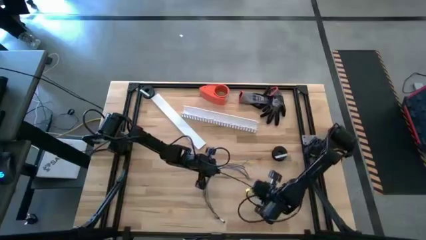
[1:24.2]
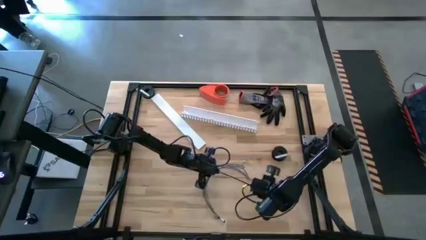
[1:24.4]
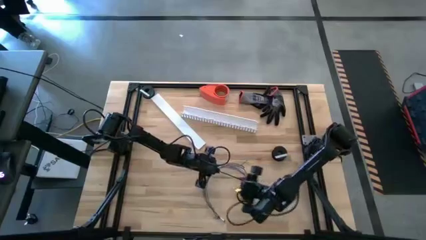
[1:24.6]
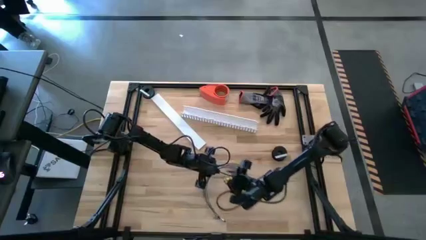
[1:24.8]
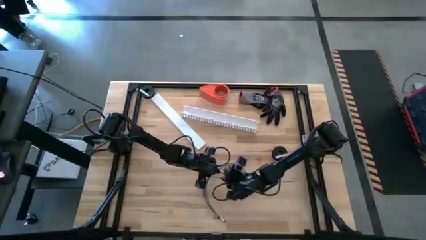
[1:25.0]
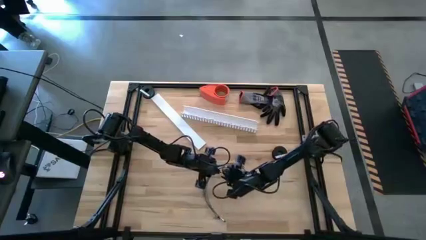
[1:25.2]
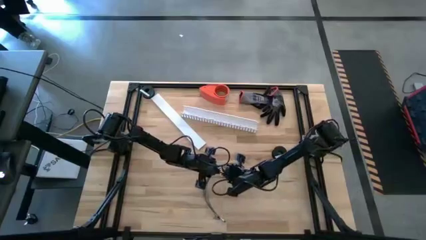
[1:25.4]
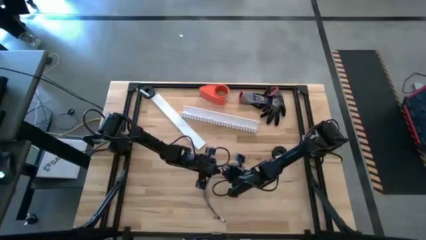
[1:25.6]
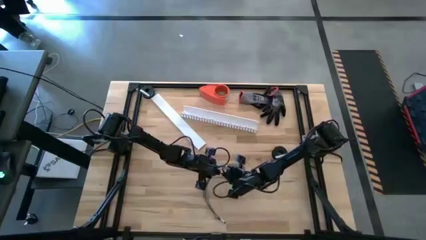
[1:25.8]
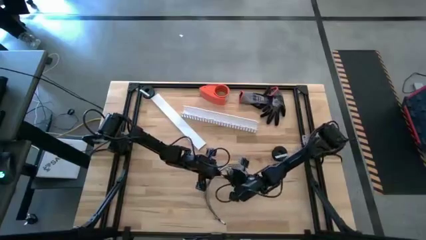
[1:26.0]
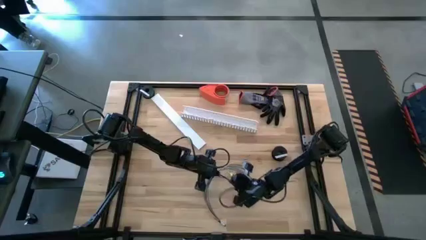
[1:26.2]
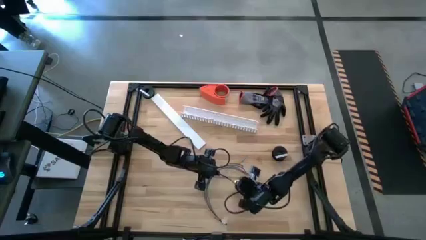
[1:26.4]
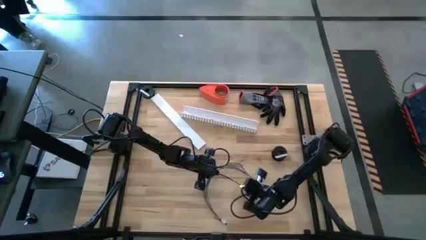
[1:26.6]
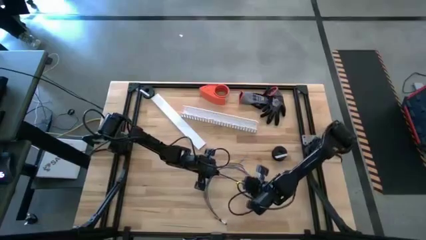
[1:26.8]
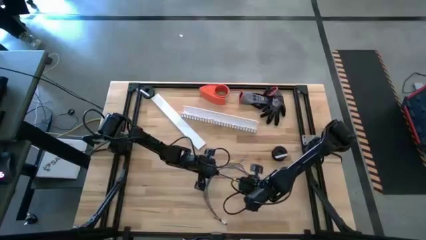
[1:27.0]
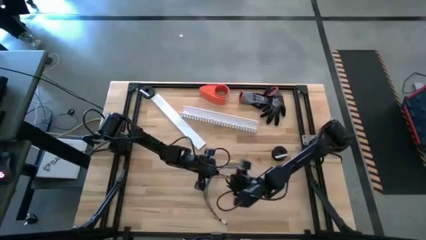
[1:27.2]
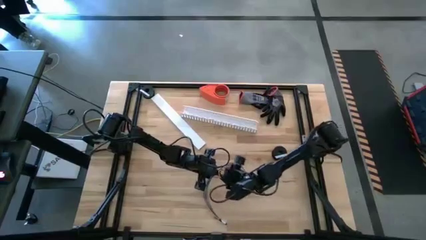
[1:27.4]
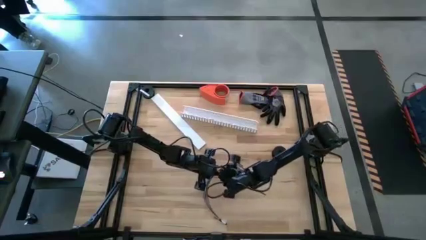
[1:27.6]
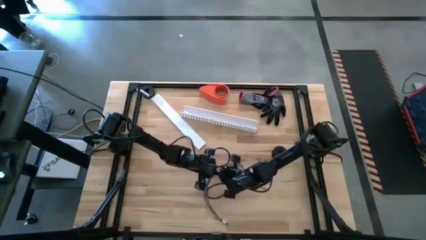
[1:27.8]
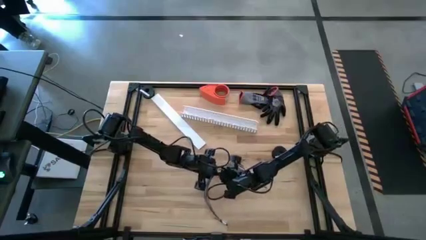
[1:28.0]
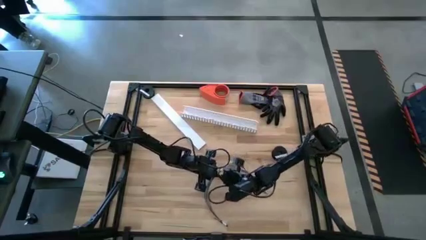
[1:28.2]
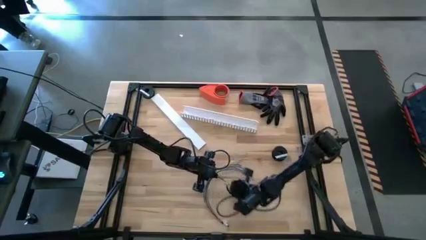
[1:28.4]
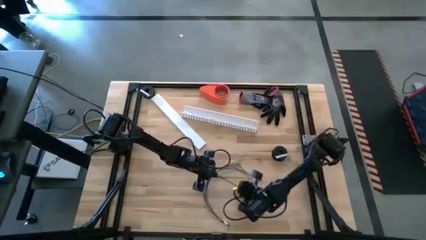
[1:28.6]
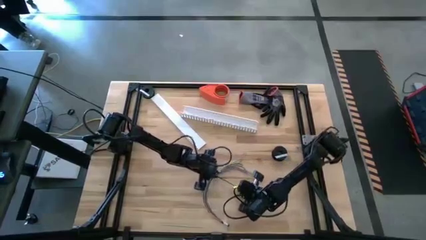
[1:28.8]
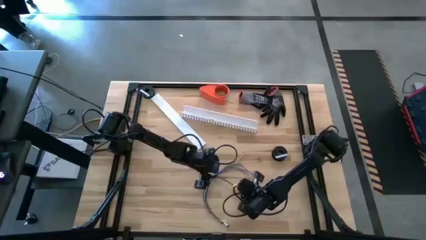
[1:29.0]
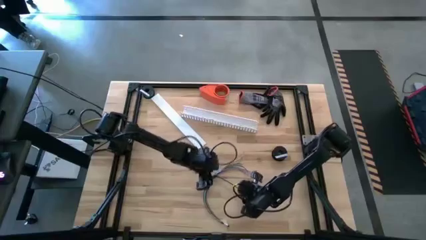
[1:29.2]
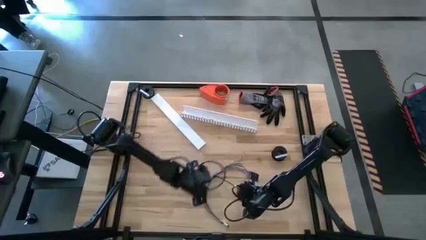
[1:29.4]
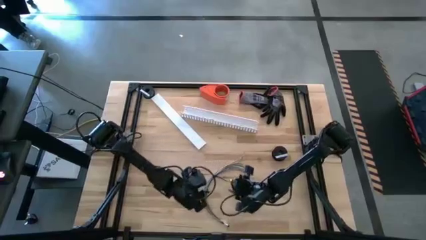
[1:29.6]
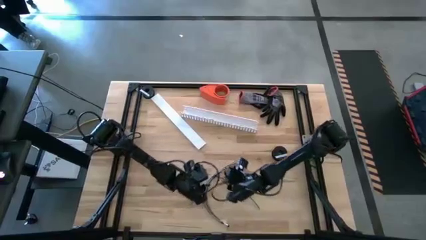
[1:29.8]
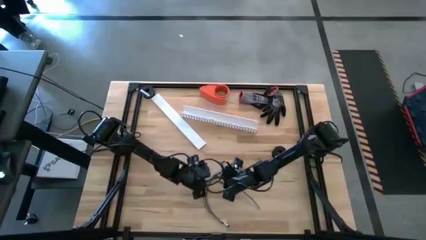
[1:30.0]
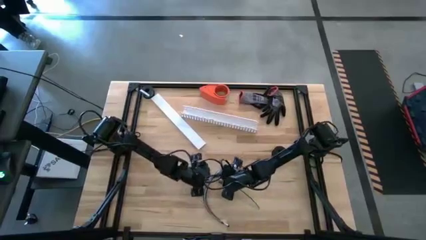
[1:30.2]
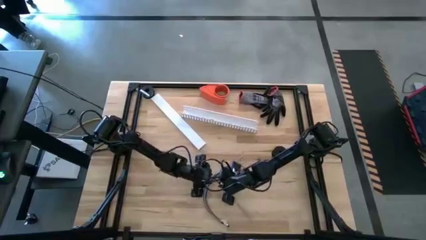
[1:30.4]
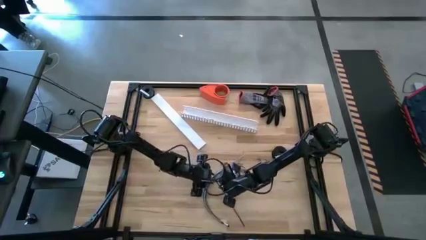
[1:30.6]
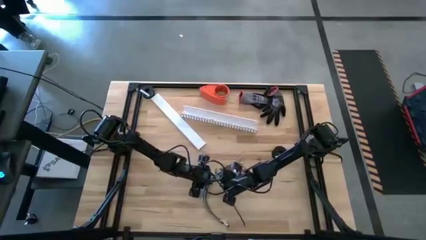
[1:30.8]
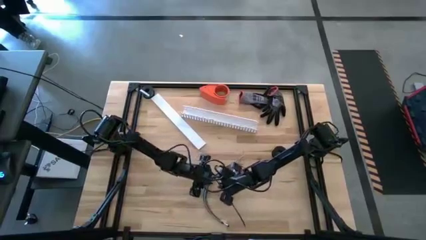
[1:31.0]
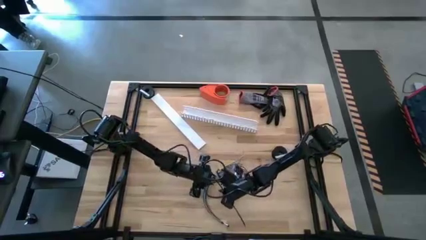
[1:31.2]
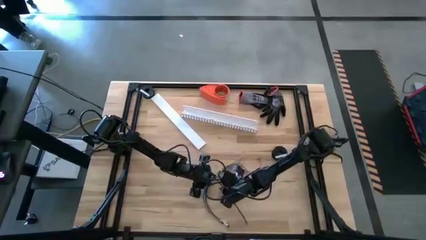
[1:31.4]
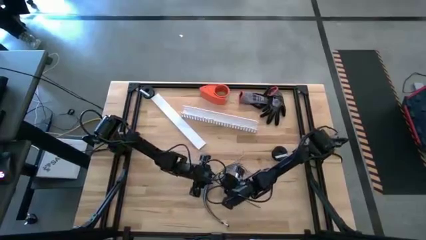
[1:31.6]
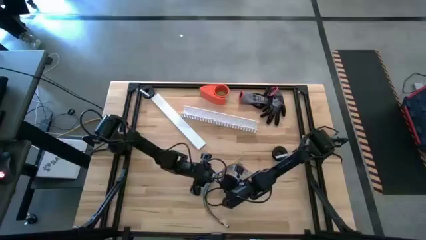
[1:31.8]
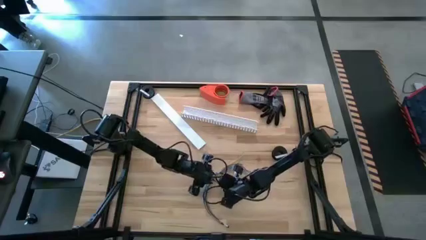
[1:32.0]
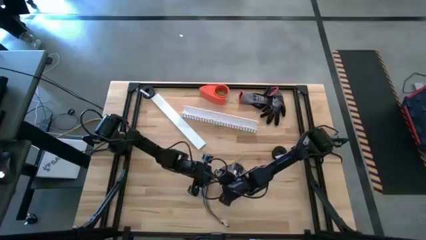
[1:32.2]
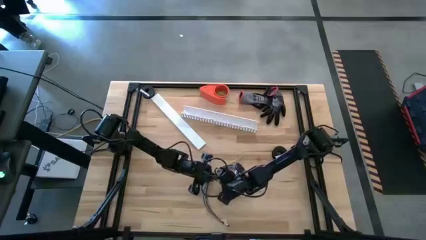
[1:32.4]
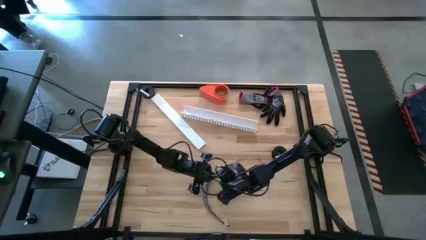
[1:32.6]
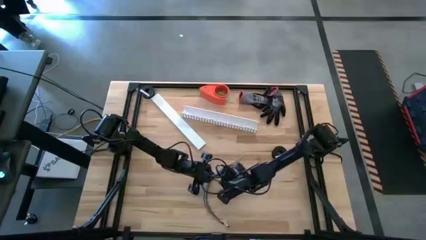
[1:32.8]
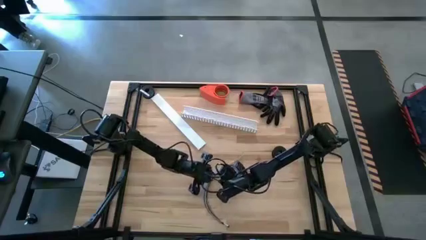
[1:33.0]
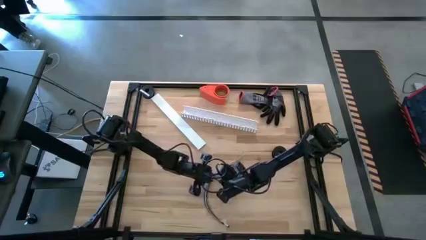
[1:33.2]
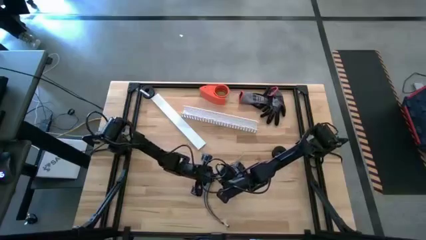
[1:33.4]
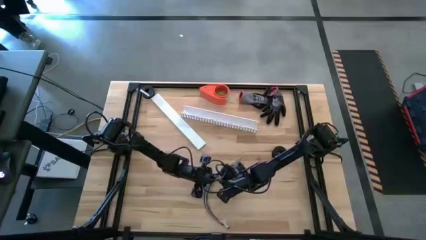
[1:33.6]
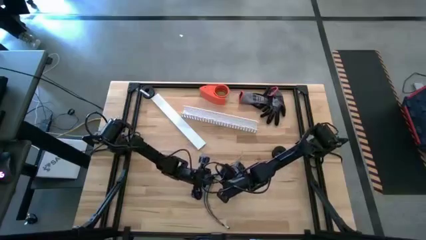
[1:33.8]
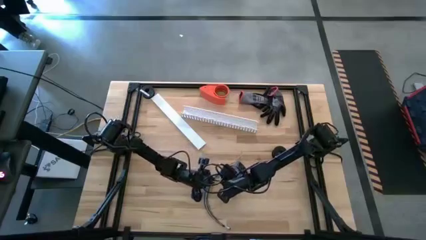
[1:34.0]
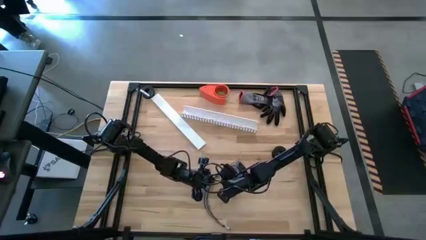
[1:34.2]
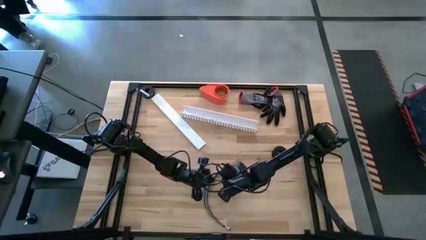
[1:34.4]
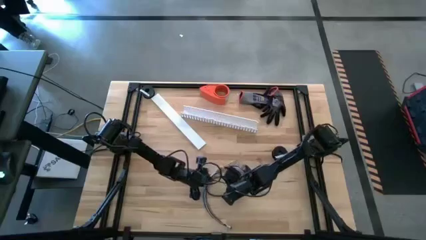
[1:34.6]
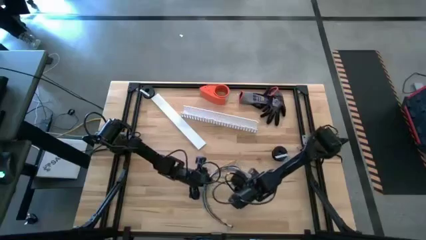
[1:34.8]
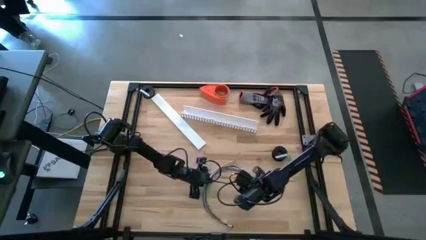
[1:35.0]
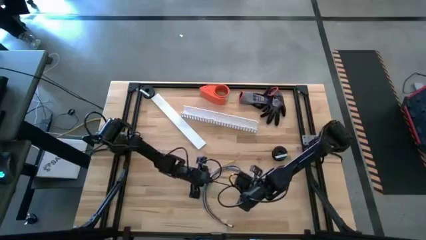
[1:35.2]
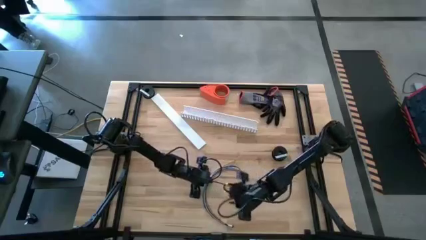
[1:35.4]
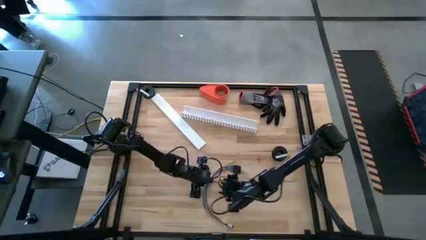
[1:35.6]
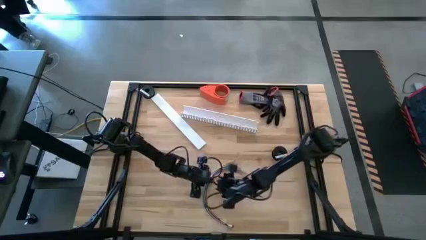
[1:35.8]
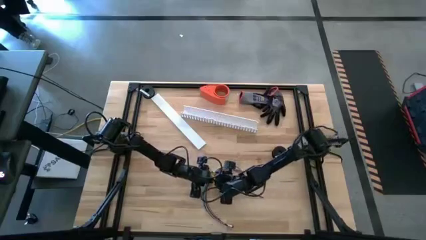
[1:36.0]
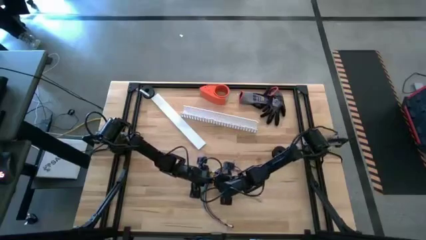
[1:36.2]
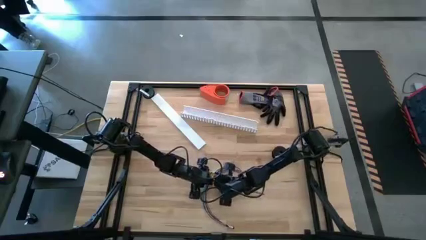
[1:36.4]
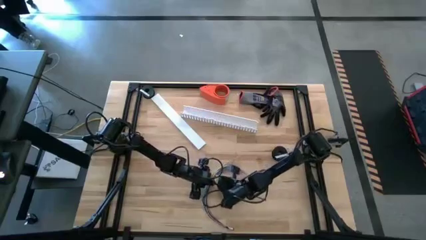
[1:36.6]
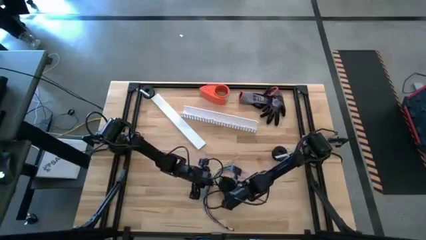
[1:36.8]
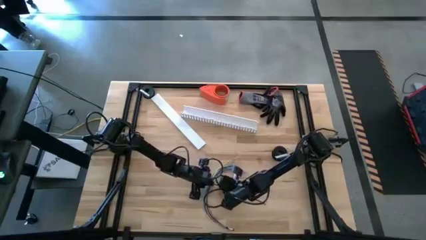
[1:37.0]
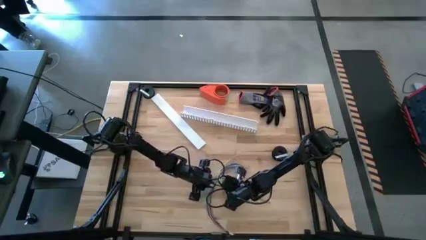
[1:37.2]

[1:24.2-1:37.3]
Task: Ziptie cables
Wrap the cable wires with the black zip tie
